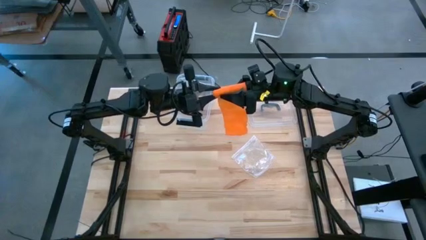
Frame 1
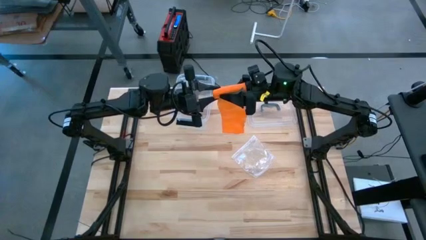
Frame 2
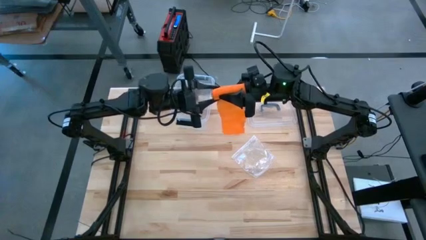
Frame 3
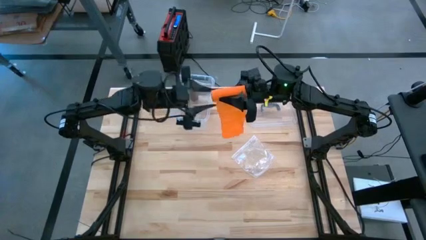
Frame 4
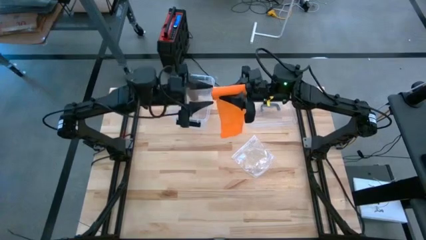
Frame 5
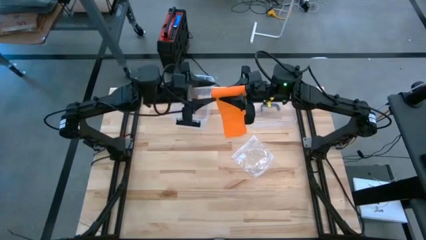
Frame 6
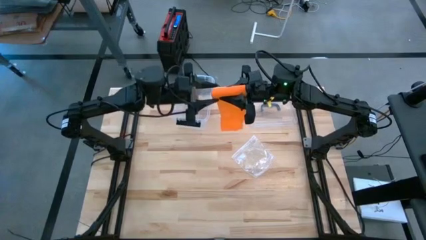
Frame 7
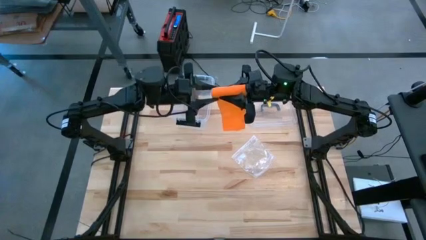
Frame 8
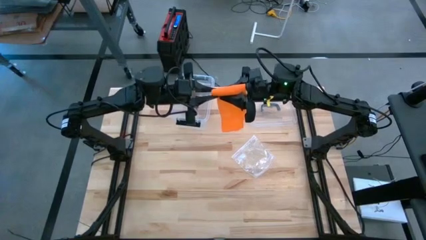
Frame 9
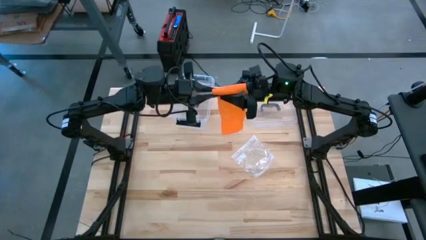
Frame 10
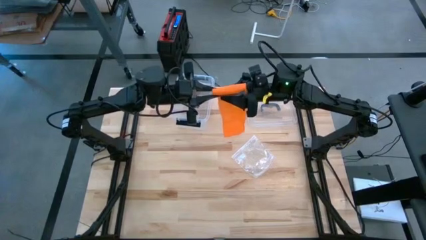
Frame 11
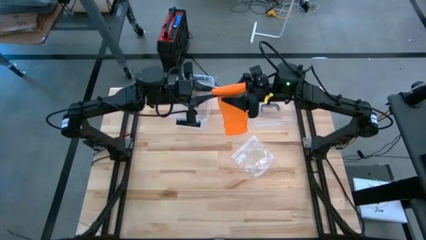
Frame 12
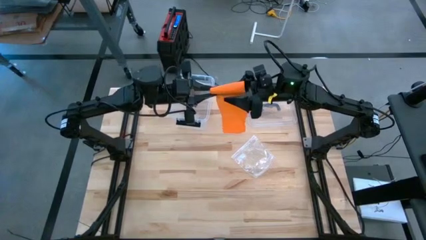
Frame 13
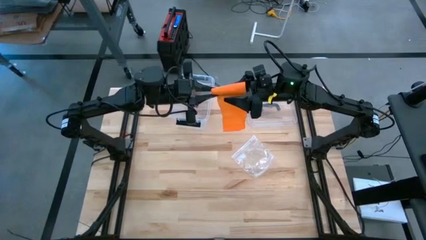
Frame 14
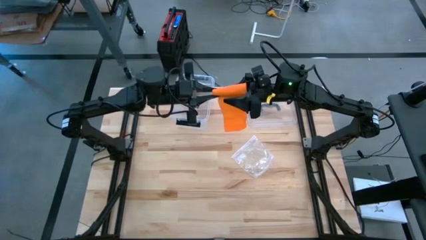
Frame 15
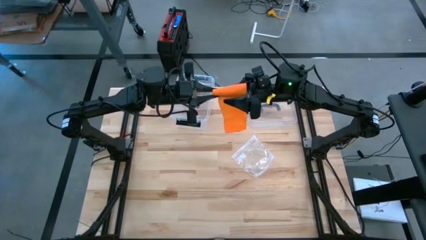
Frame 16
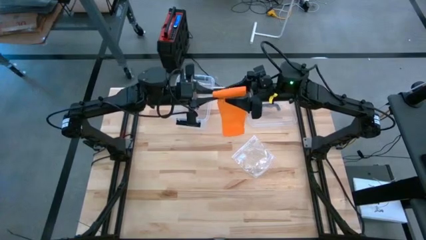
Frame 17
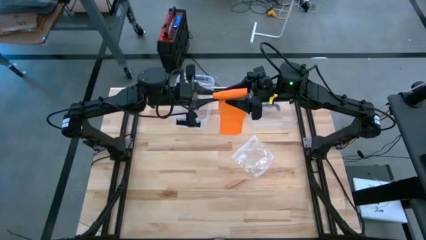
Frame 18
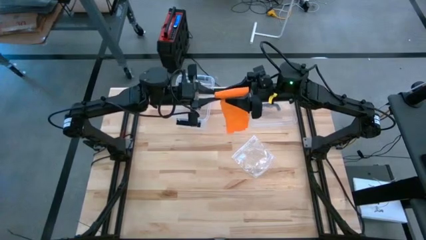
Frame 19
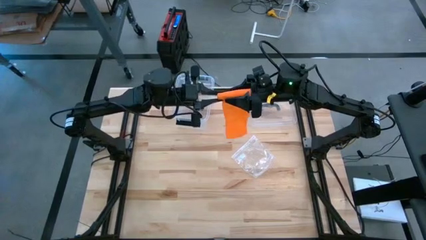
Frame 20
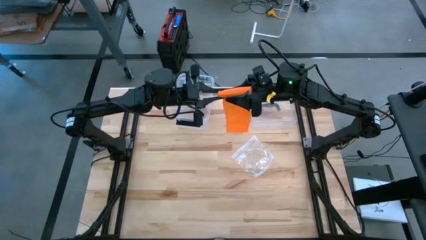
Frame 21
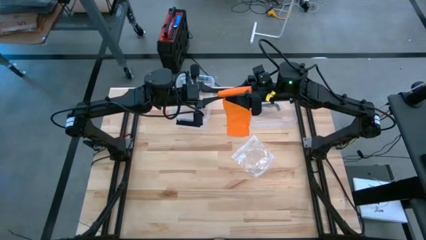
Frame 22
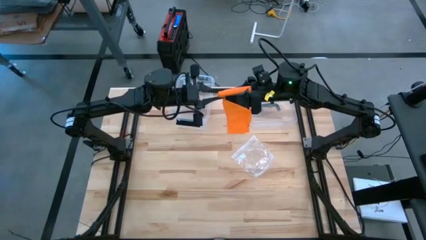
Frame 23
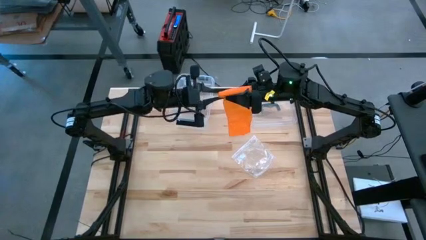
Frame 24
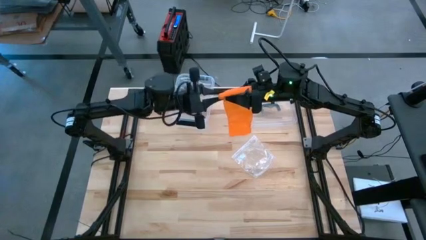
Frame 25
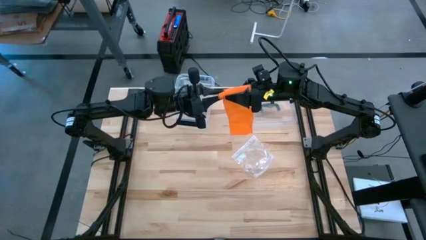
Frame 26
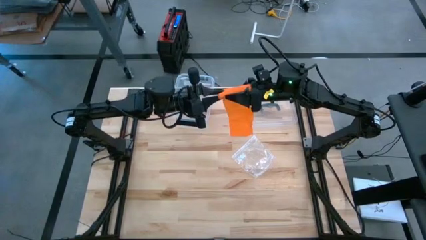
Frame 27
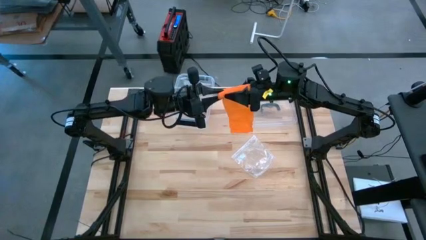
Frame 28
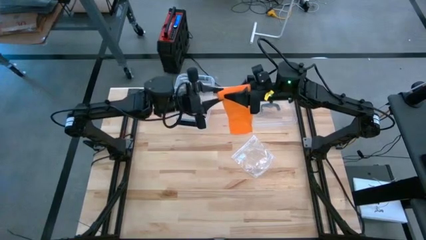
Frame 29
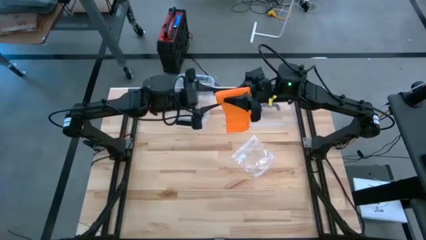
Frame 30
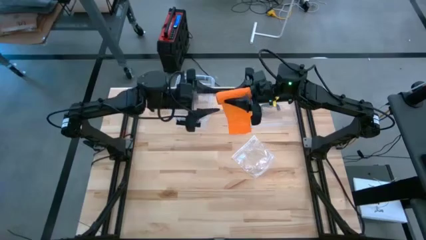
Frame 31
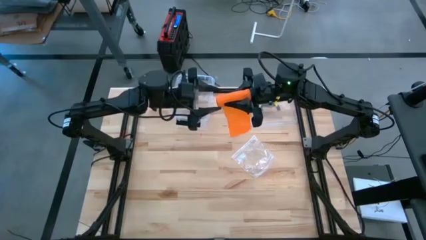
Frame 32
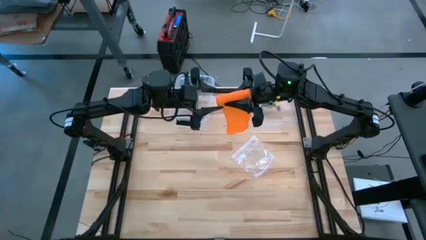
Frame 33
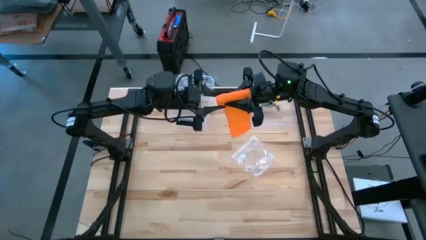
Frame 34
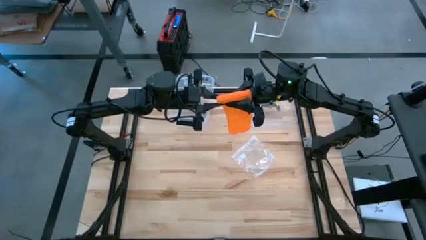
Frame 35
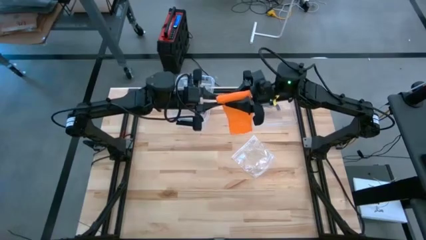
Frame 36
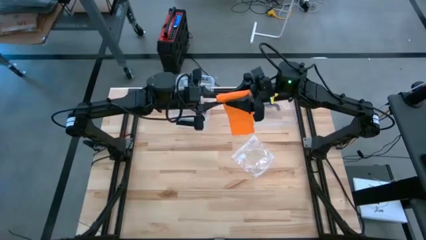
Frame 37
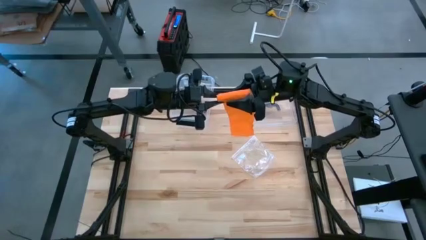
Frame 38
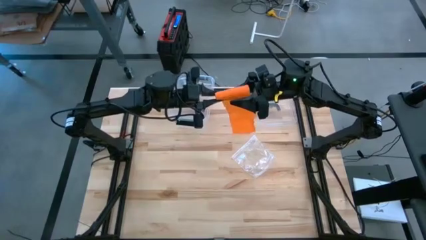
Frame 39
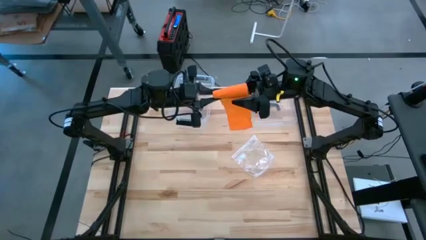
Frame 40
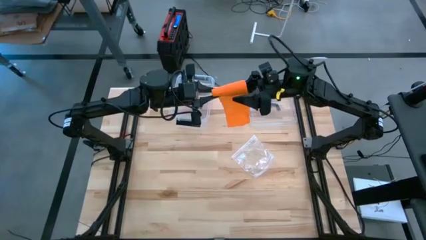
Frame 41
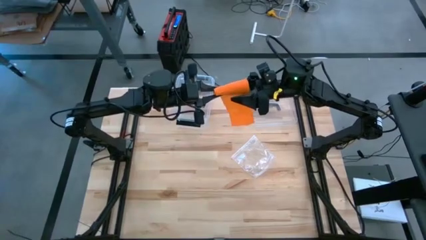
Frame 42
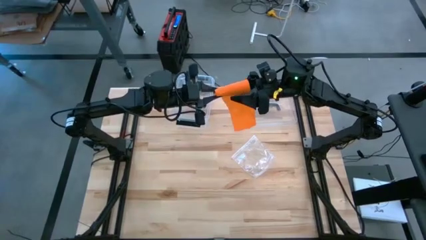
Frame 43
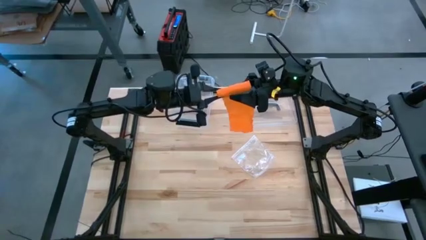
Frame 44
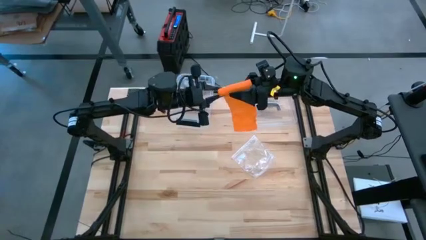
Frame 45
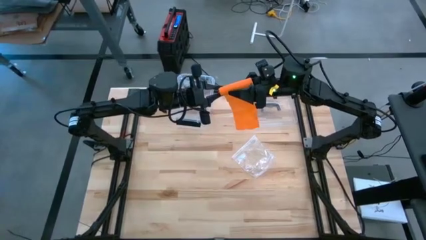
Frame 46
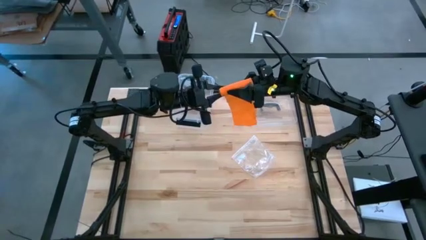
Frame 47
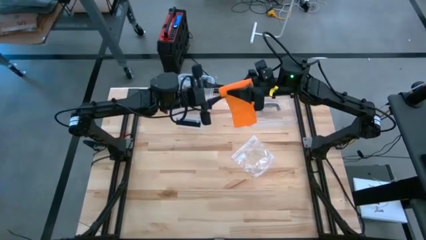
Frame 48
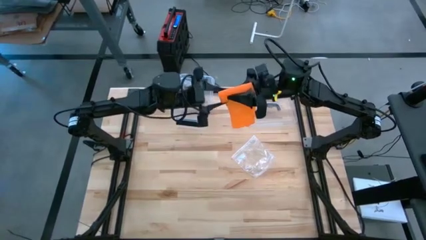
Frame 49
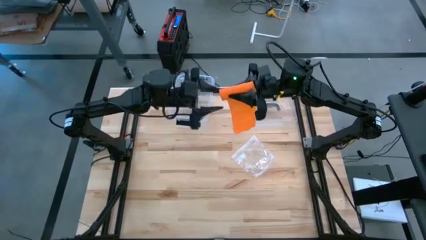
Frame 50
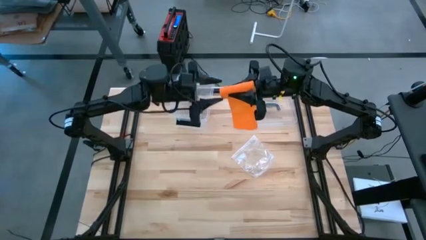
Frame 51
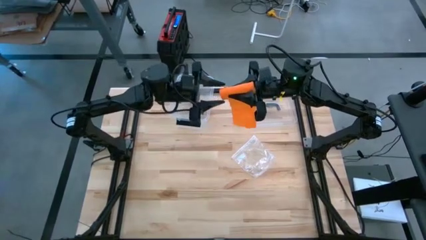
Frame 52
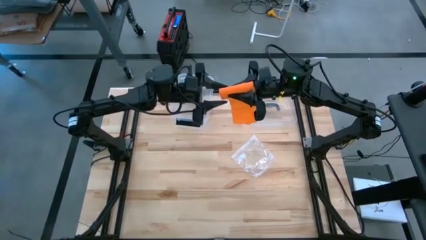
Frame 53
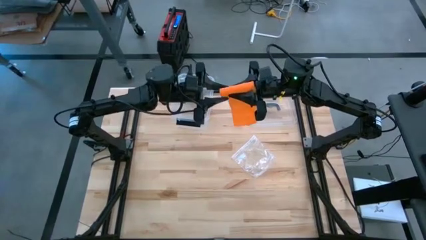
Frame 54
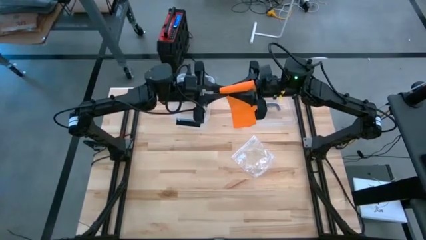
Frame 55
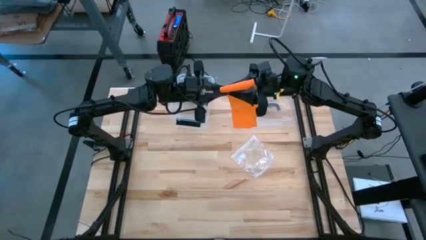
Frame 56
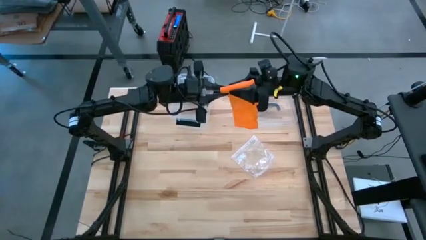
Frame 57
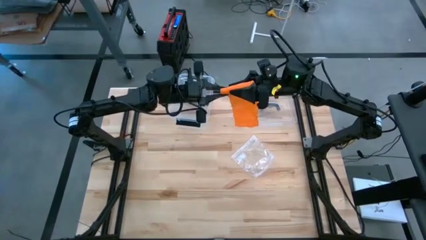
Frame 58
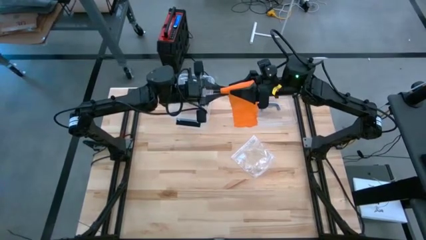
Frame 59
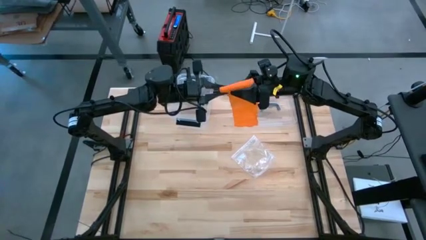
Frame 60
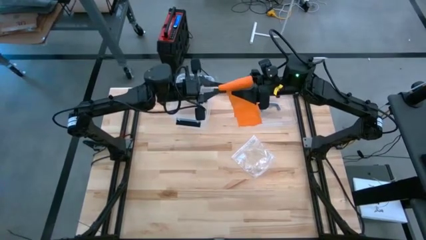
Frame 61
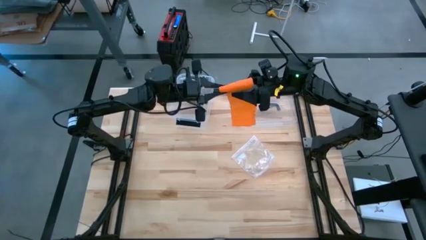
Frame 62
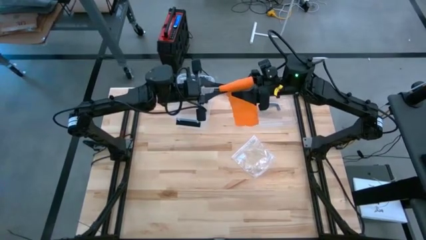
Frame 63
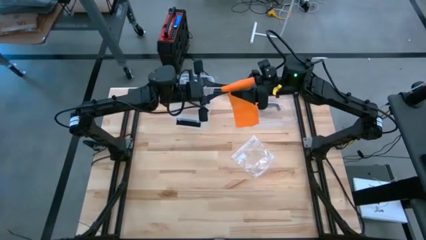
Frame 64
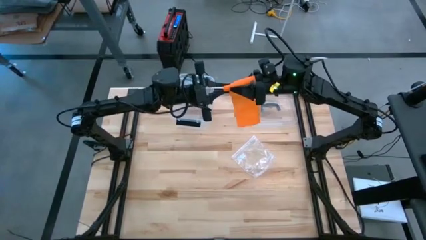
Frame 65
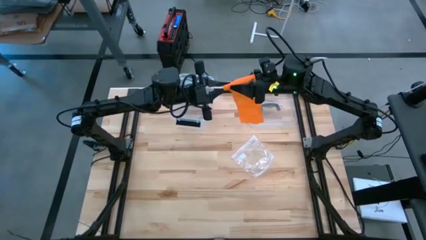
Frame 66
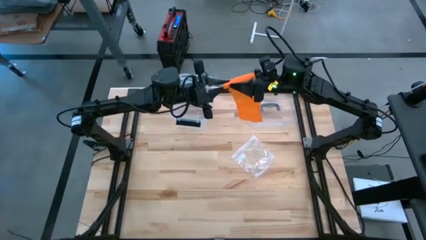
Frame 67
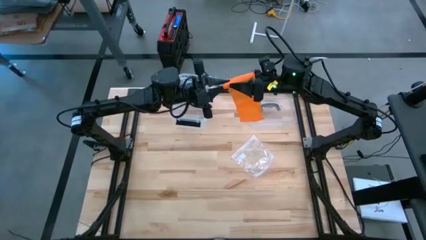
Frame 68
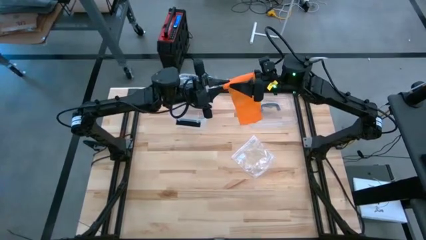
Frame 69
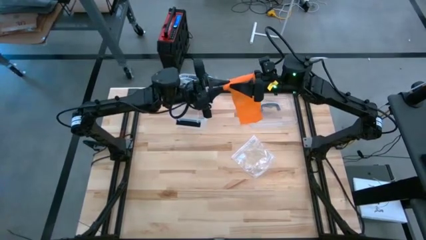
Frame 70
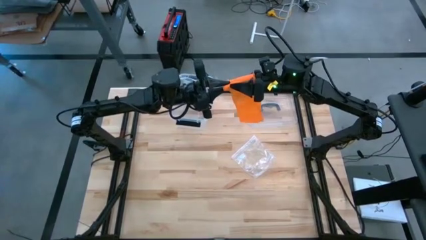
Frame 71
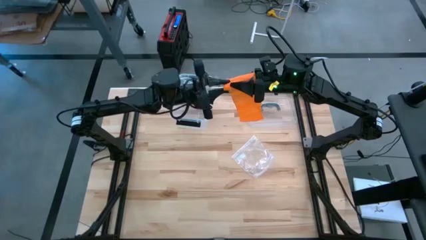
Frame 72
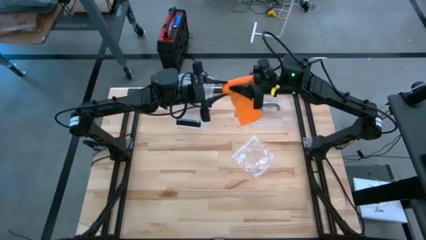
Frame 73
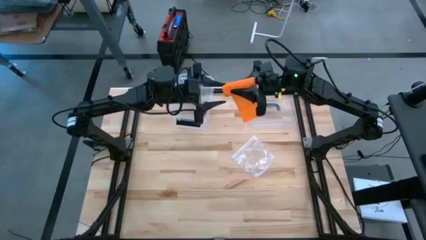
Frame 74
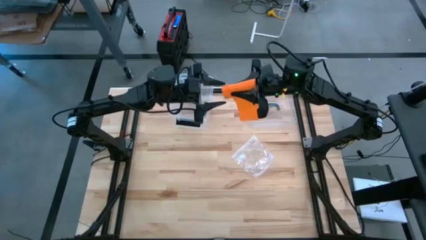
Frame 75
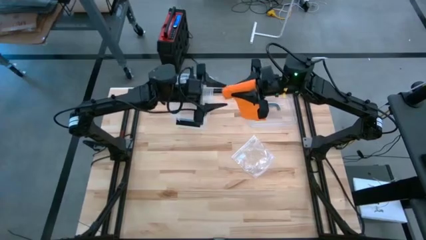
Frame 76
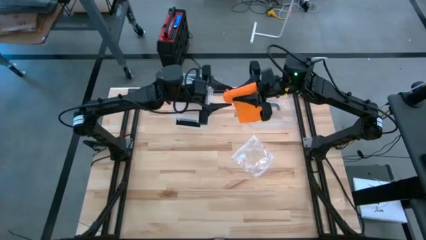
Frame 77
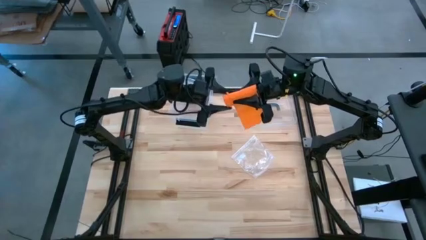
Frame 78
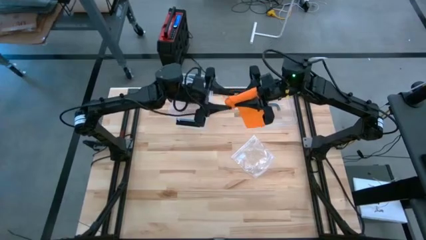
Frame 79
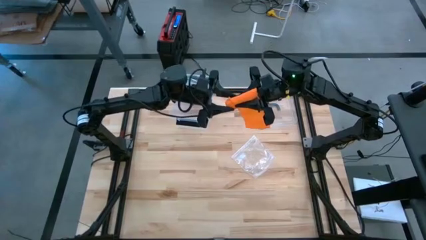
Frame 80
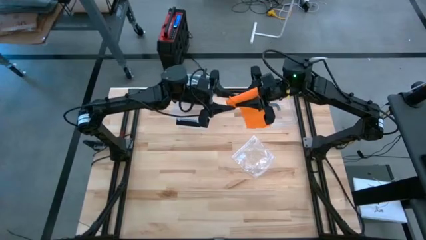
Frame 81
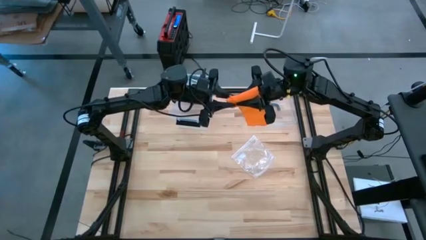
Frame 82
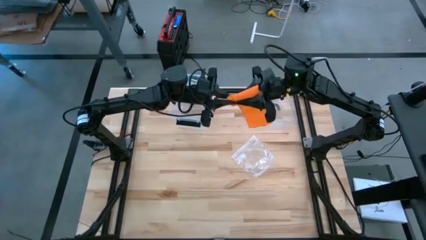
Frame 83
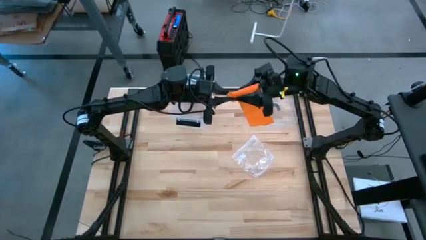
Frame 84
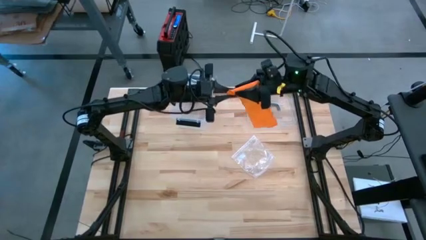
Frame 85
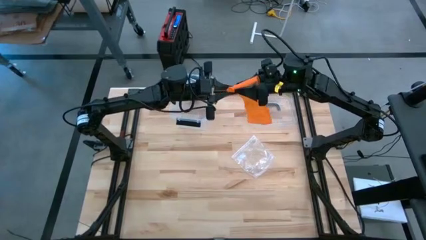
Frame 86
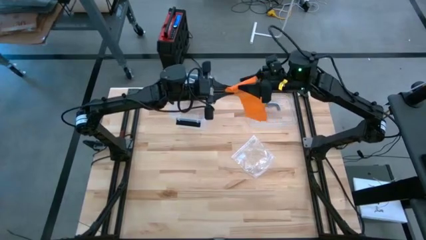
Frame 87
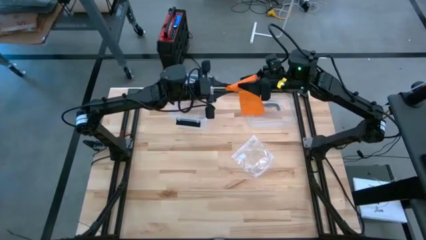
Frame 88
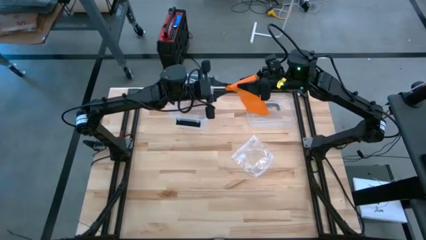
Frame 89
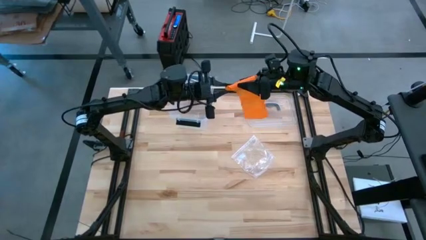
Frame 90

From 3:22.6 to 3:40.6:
Task: Roll bandage
Roll the orange bandage
